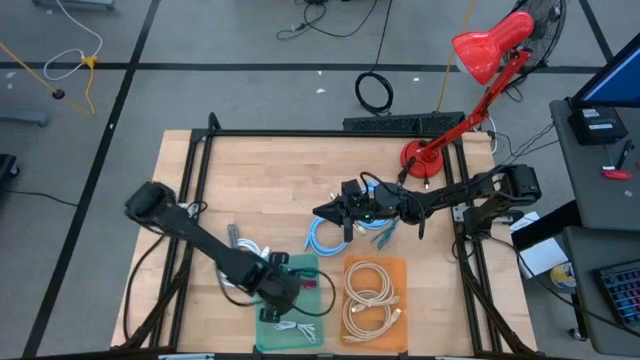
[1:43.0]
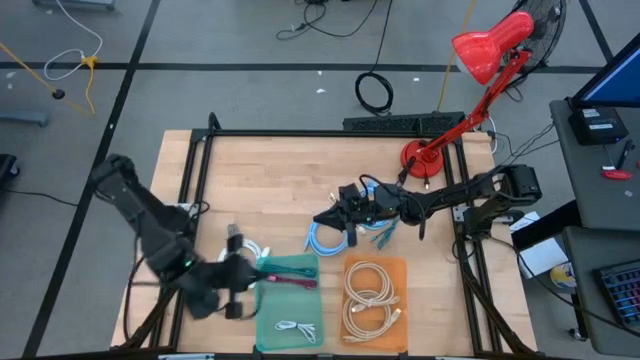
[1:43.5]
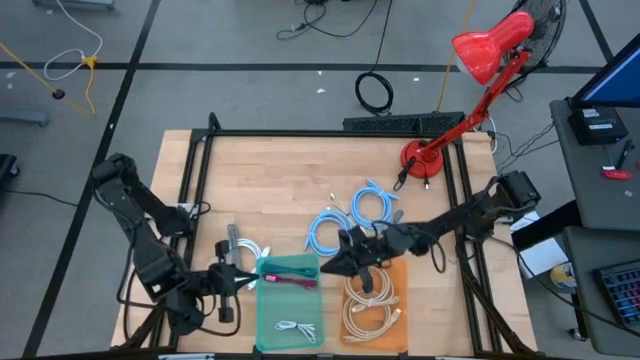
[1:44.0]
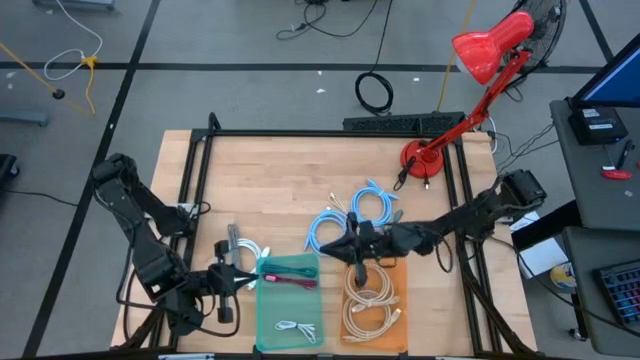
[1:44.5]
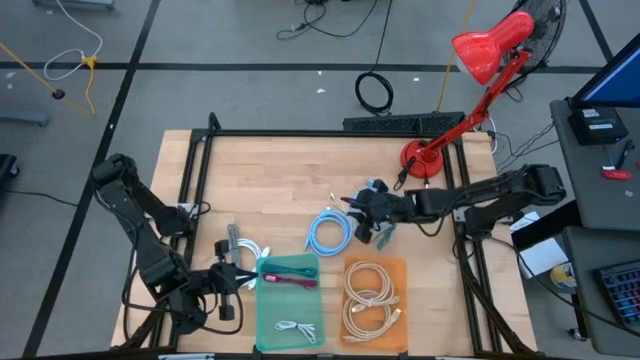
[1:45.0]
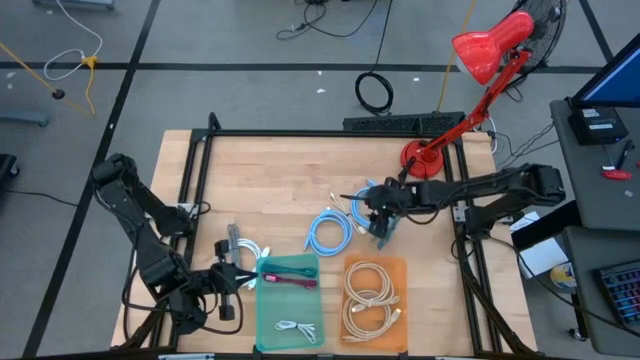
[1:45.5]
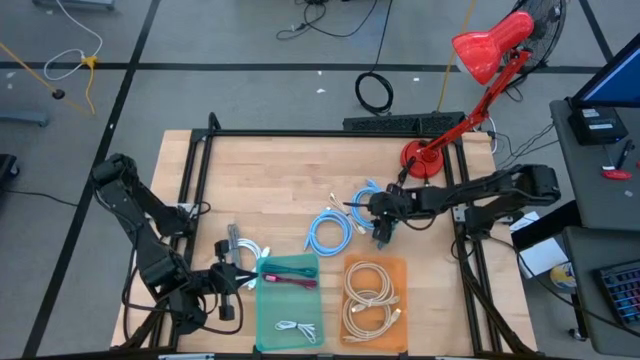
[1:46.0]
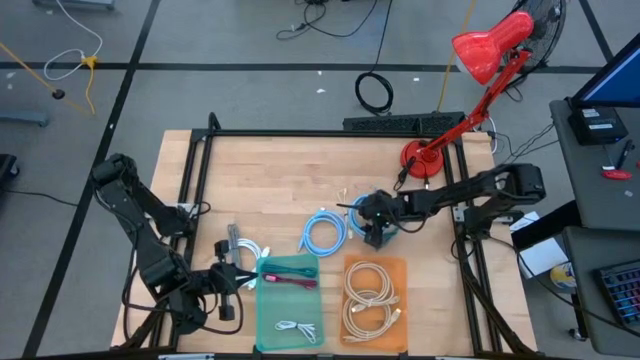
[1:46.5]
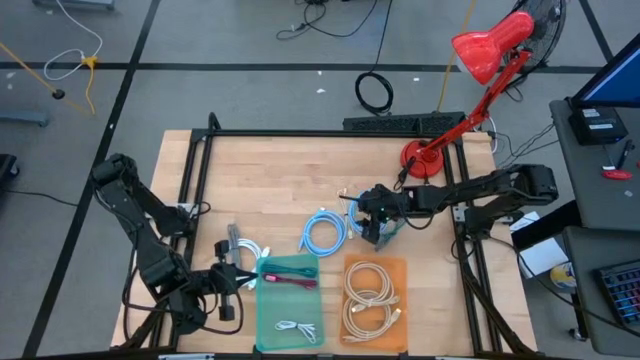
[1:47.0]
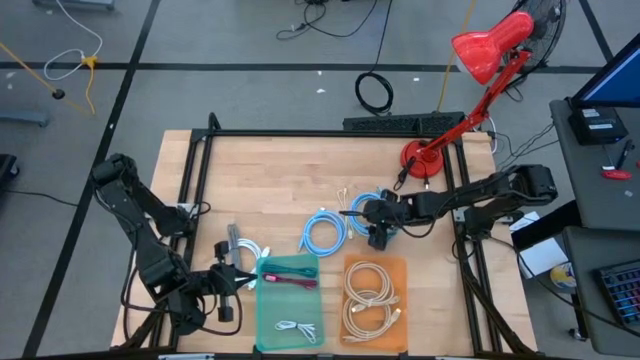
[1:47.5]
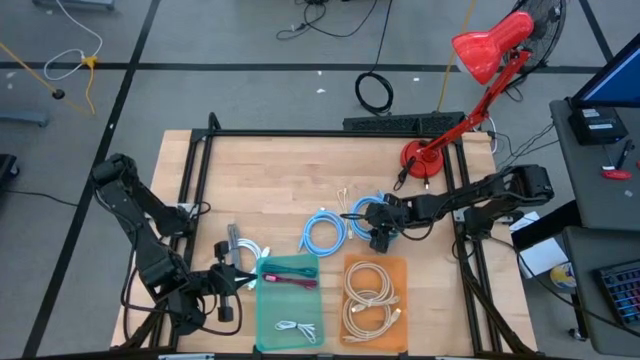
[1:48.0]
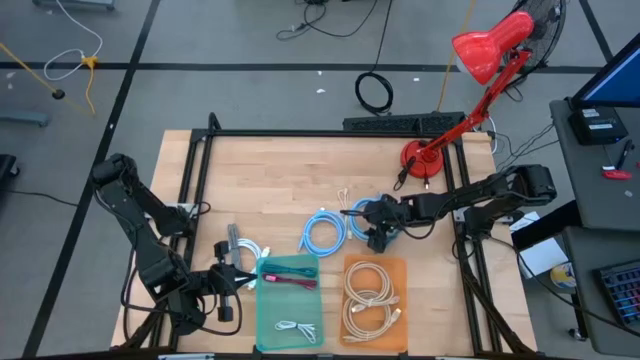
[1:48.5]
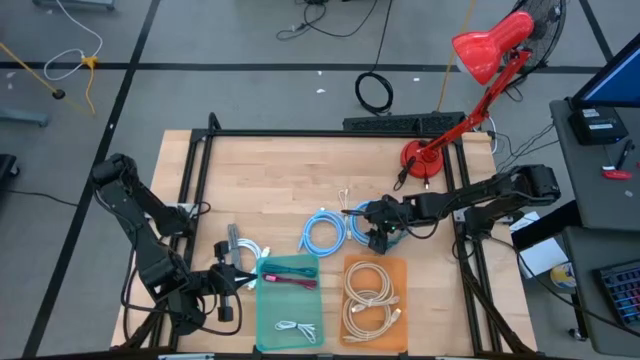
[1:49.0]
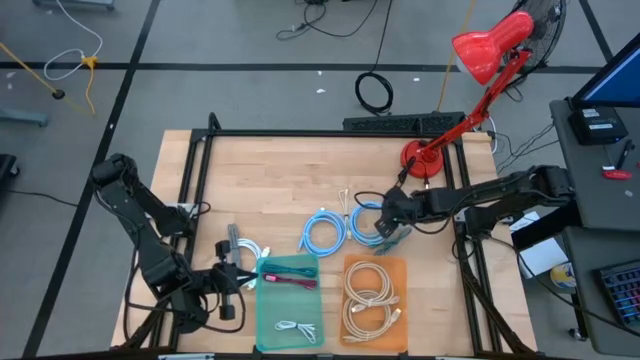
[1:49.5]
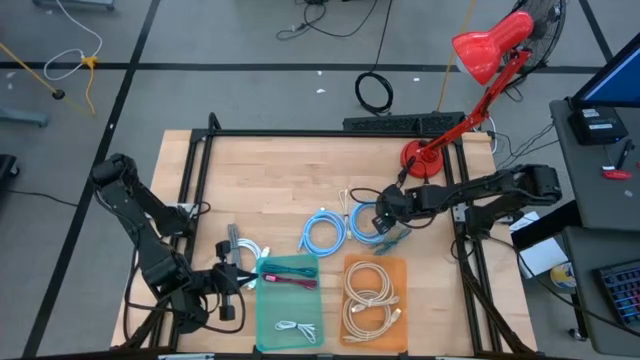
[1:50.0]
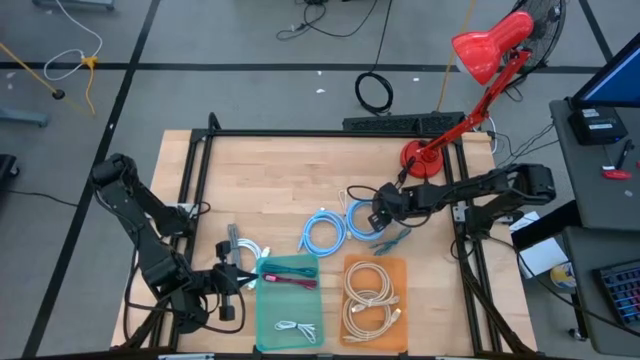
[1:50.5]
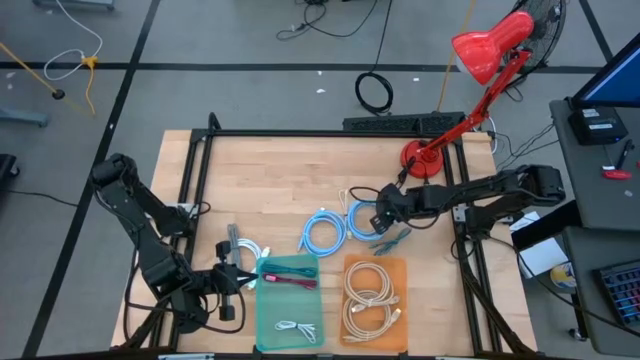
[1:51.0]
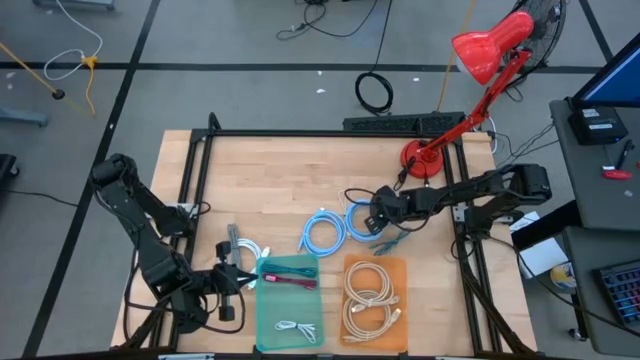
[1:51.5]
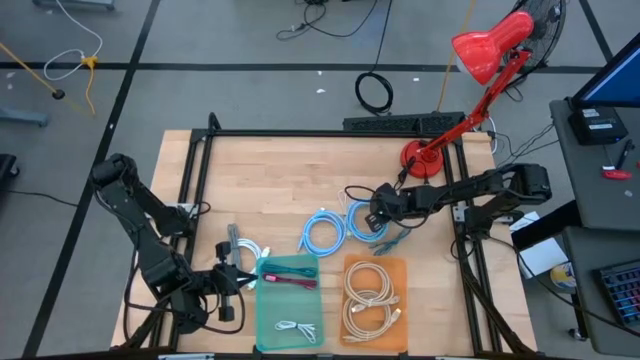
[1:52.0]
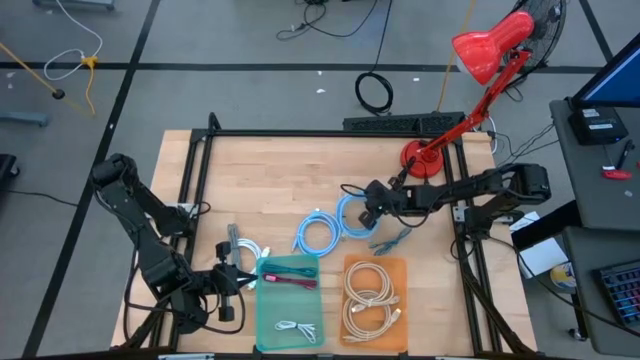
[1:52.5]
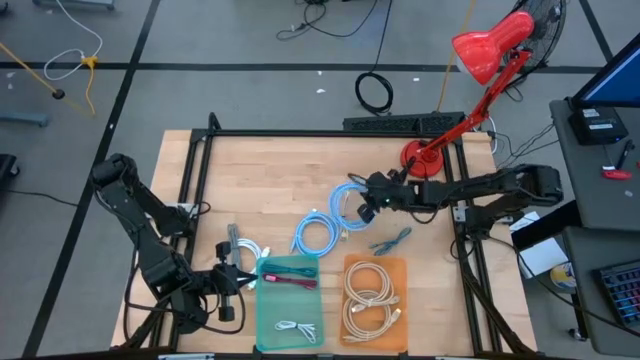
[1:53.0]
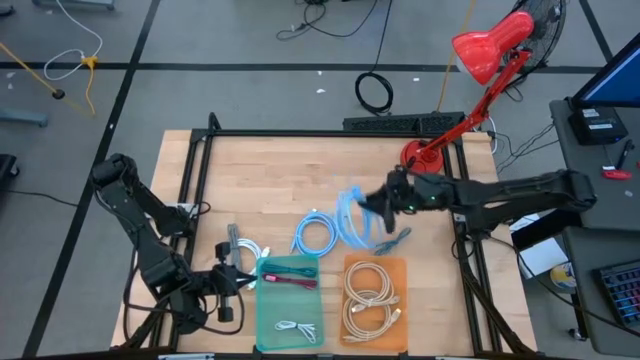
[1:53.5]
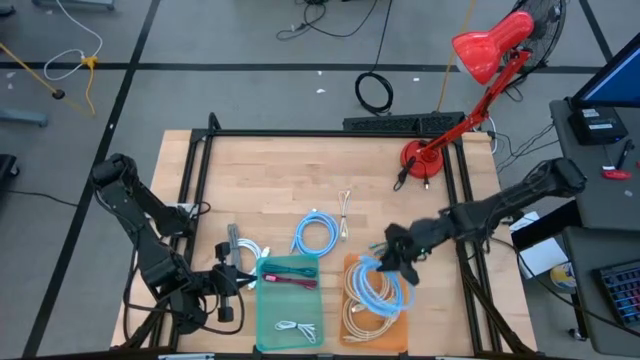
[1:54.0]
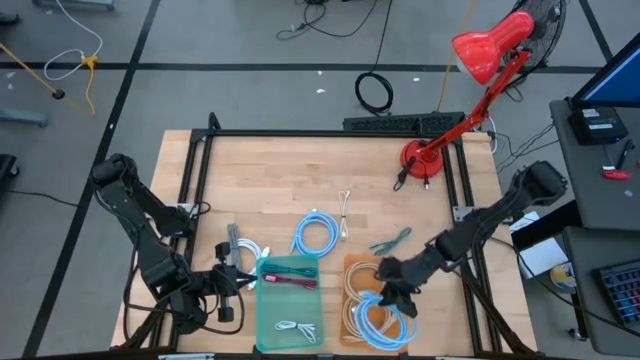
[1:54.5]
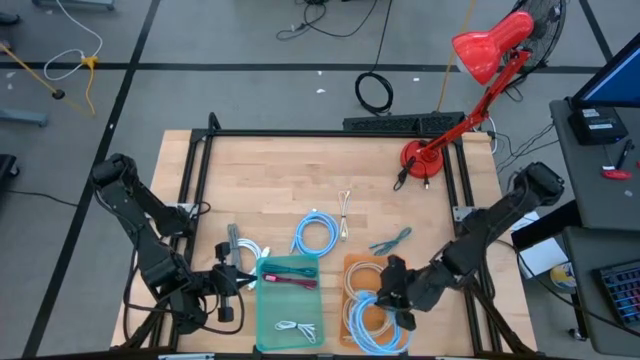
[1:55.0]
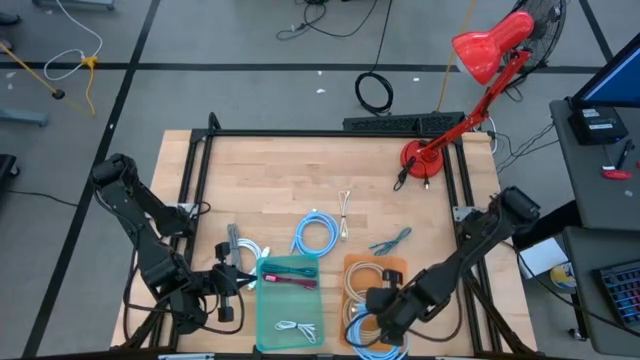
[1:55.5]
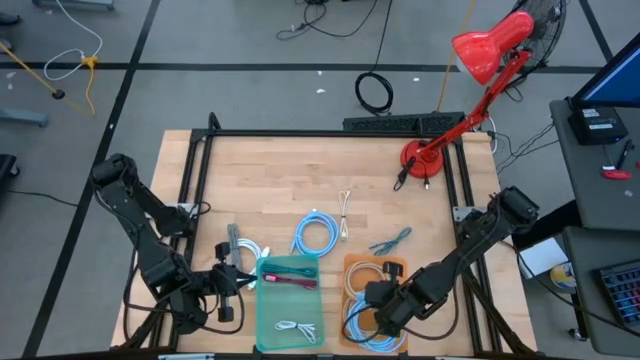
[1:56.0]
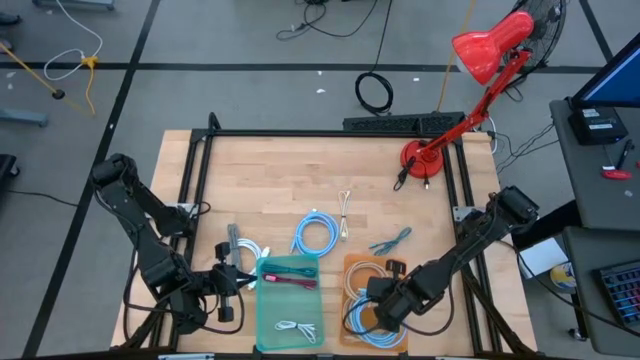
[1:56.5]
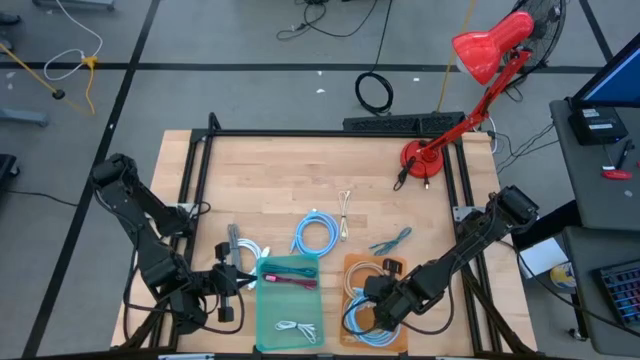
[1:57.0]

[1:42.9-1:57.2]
Task: Pick & Place USB Port
Put the right blue video cable into the orange bin

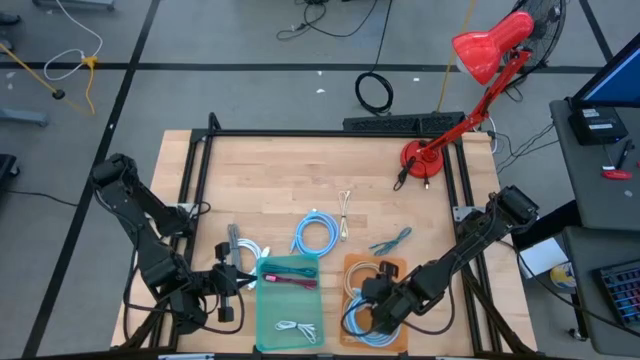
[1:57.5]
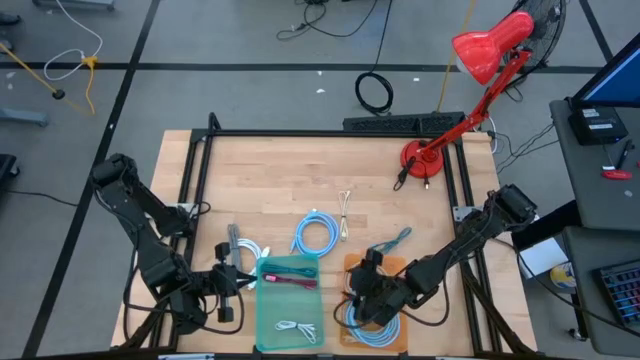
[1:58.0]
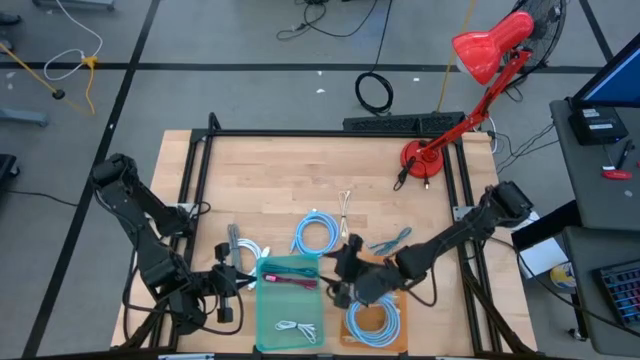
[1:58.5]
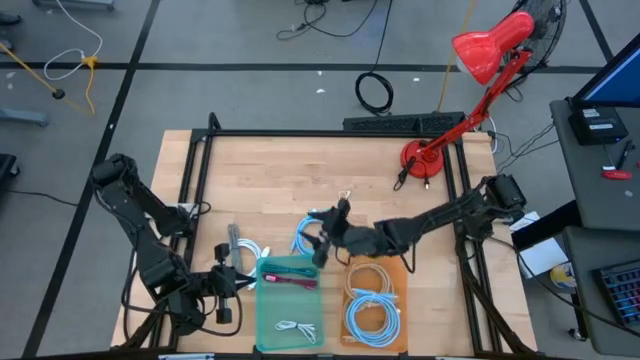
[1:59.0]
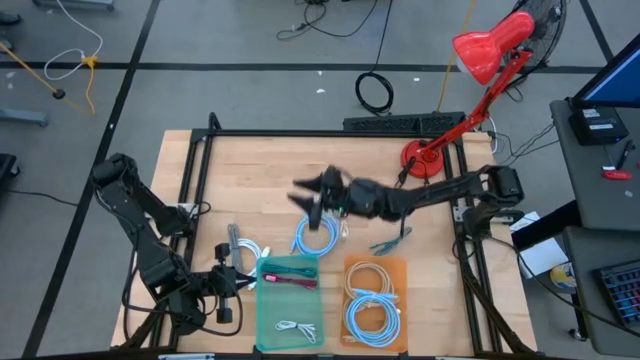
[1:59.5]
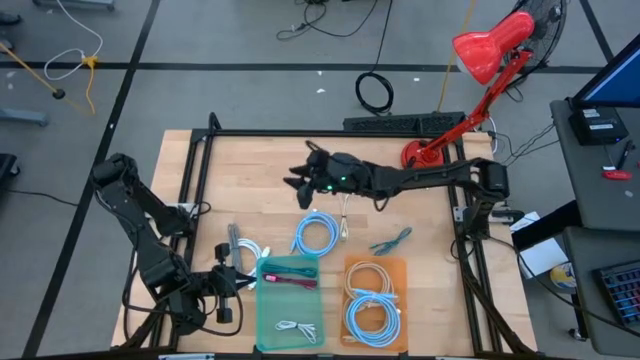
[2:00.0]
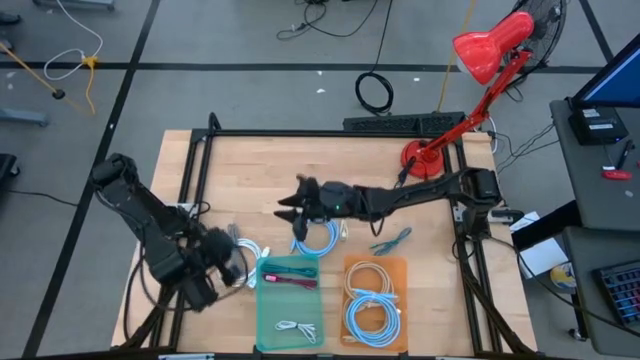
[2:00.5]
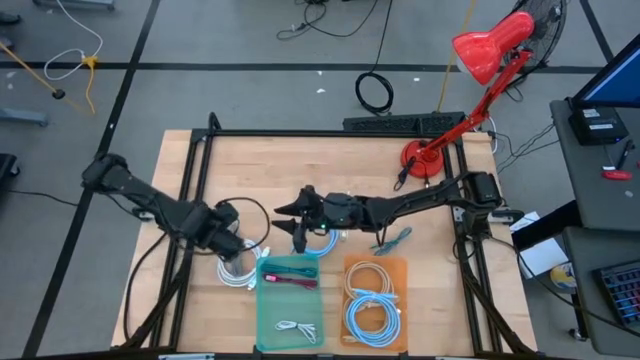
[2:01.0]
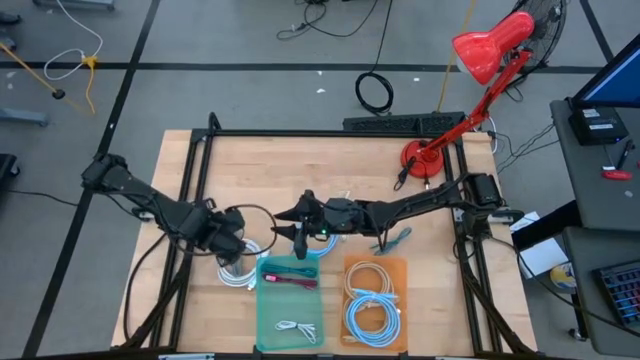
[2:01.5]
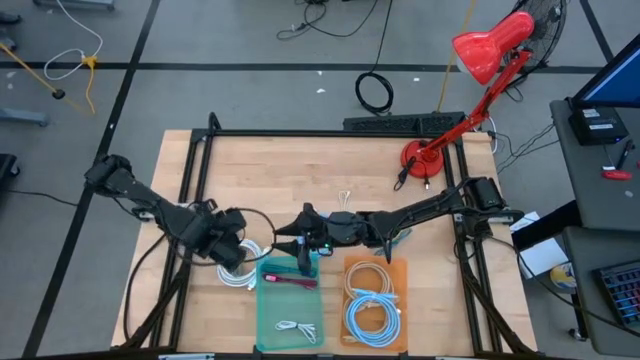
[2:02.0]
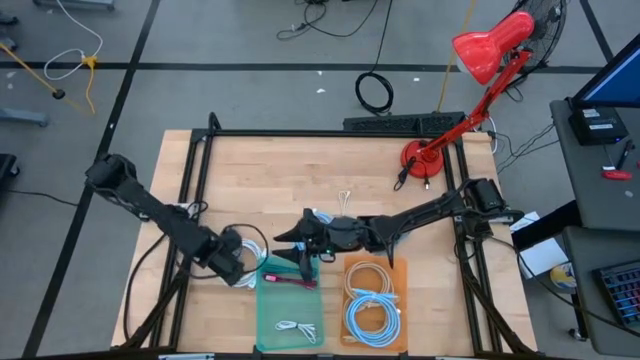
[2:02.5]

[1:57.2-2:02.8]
Put the black charger cable into the green bin
